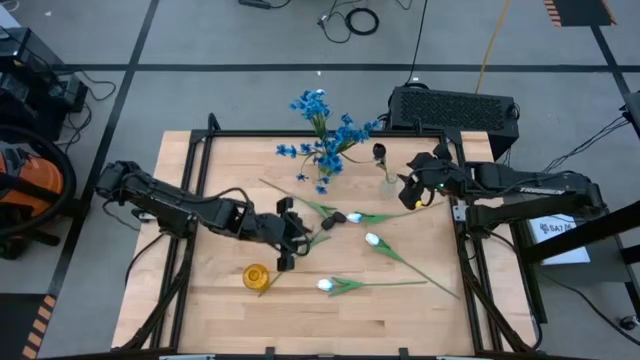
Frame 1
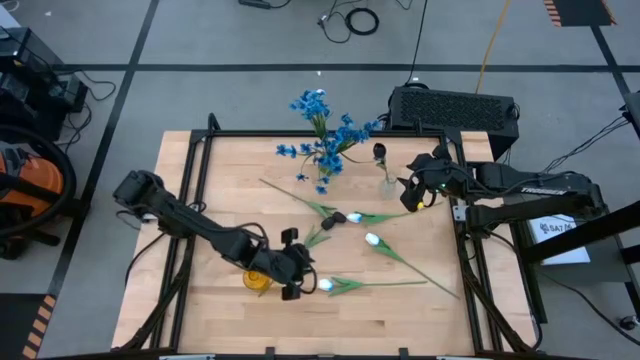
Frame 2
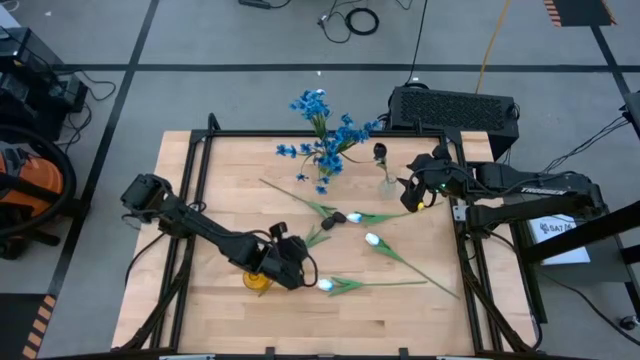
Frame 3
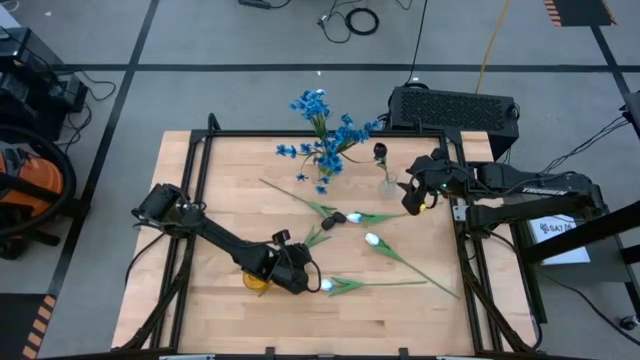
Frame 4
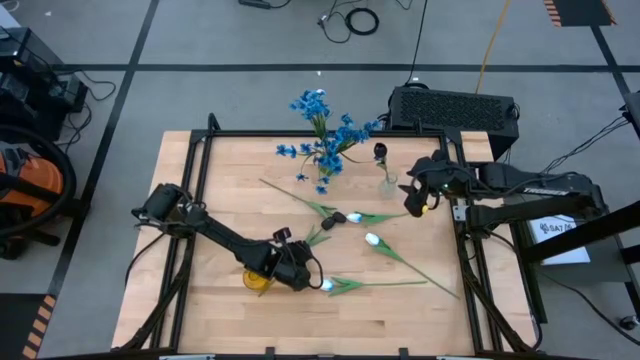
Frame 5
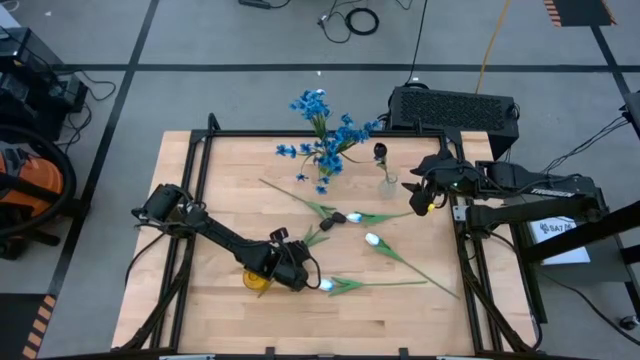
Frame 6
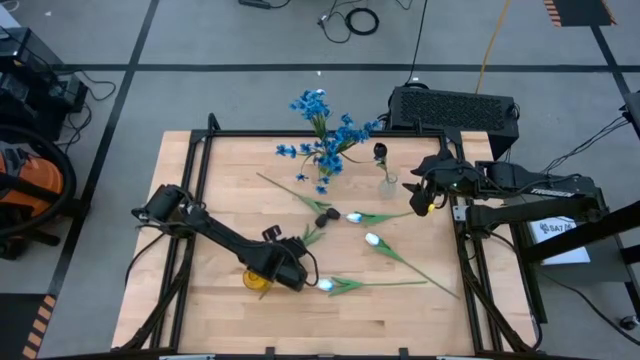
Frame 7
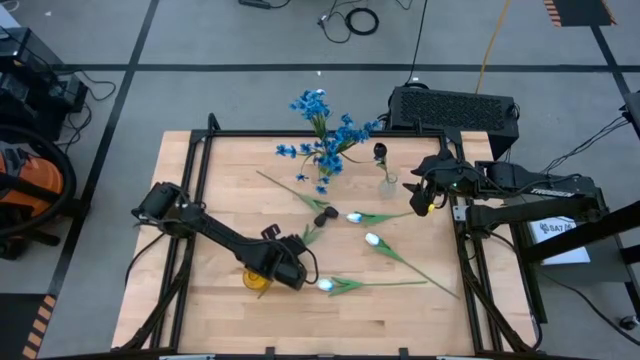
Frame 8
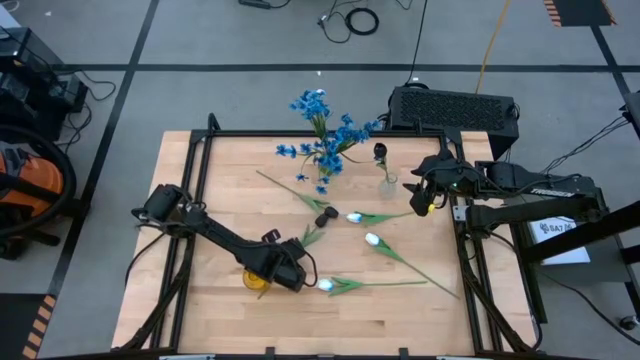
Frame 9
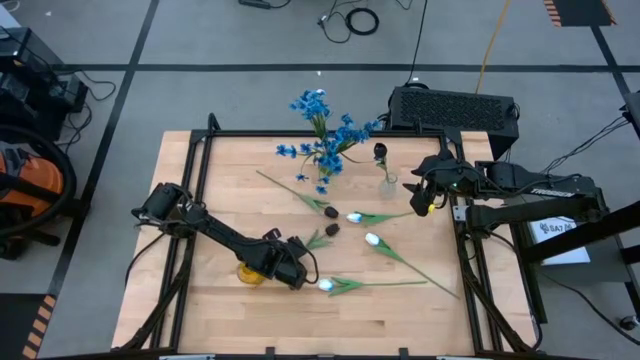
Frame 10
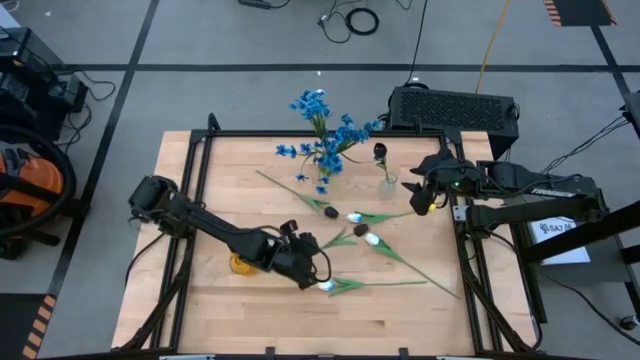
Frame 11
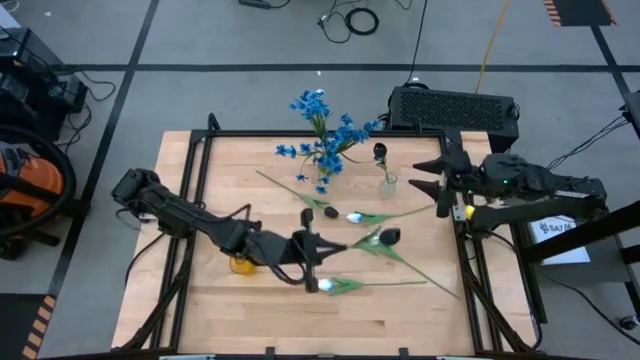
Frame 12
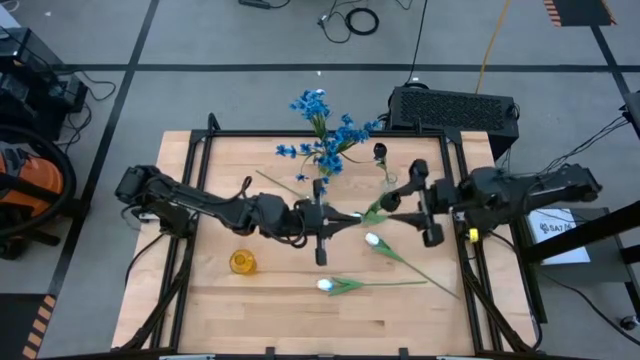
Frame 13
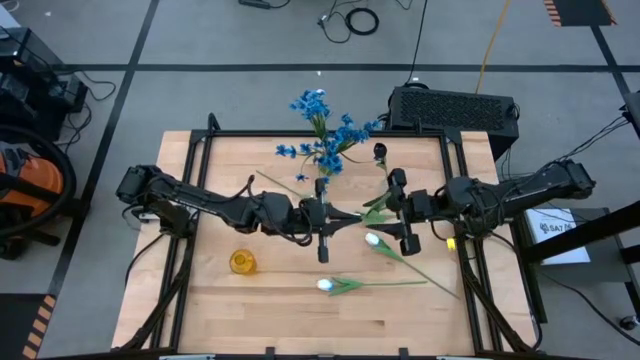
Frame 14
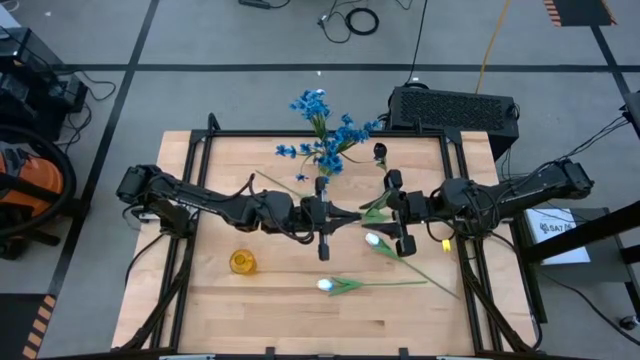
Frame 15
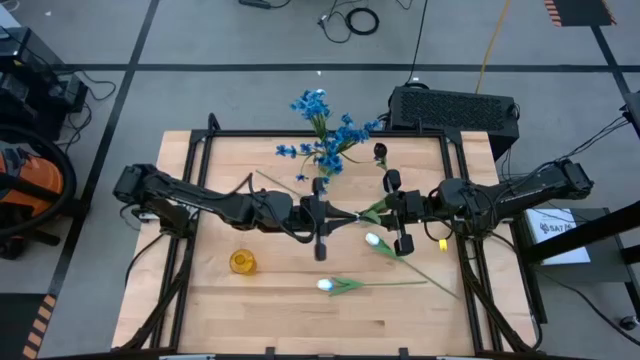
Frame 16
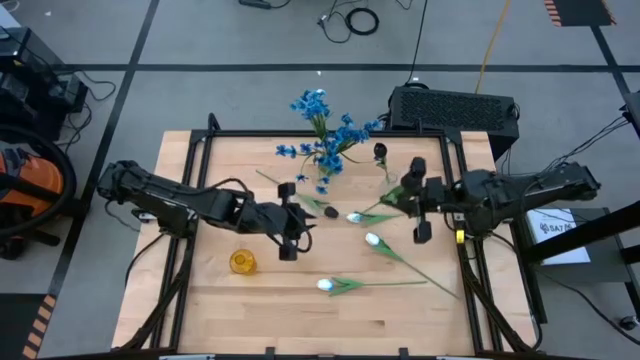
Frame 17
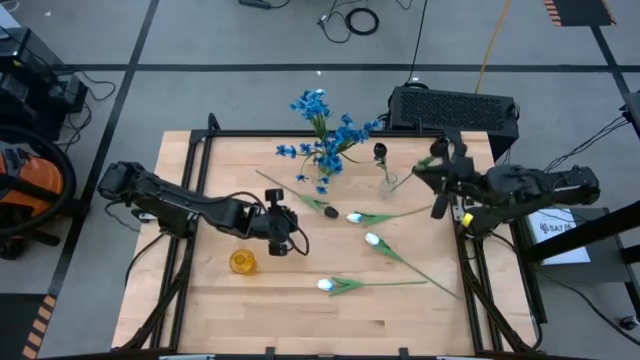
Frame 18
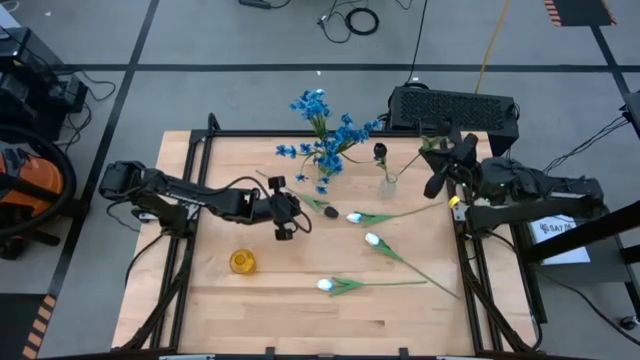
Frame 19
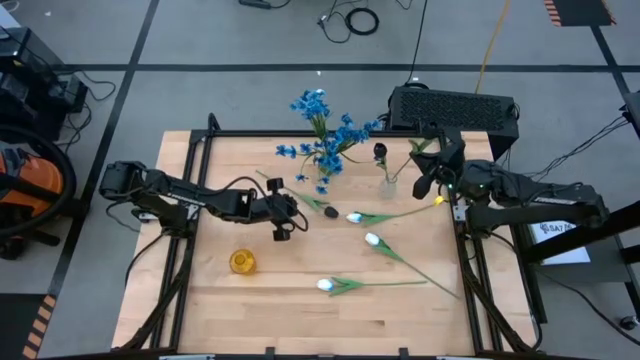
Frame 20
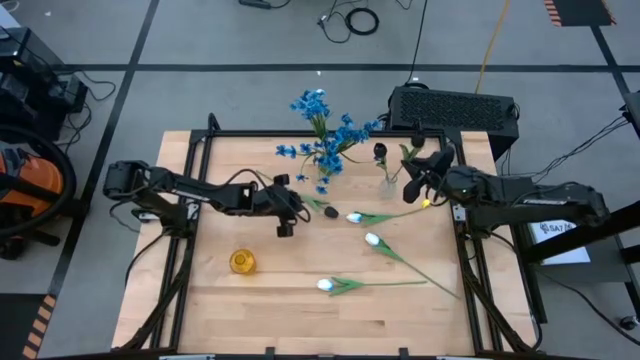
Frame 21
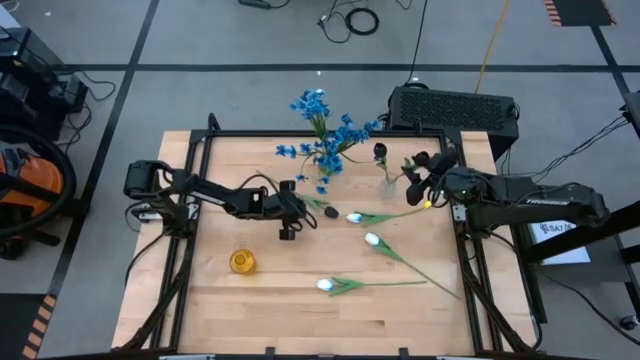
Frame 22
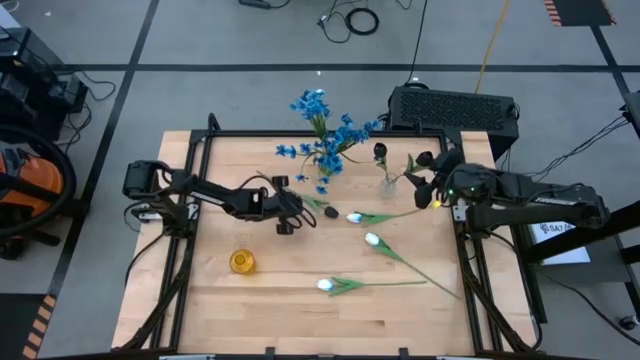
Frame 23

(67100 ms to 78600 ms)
Task: Sort flowers into vase by color
Put the bottom black tulip into the transparent vase

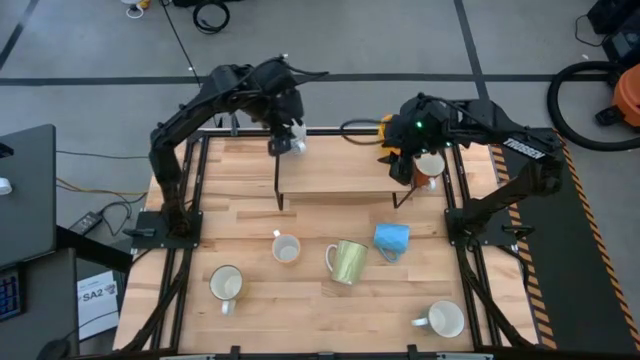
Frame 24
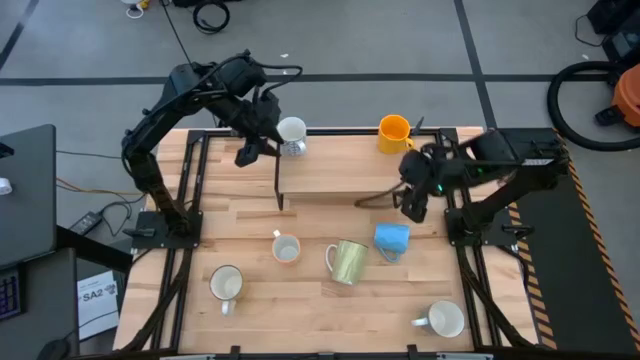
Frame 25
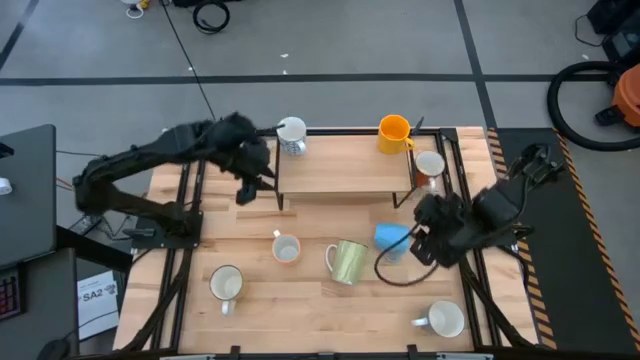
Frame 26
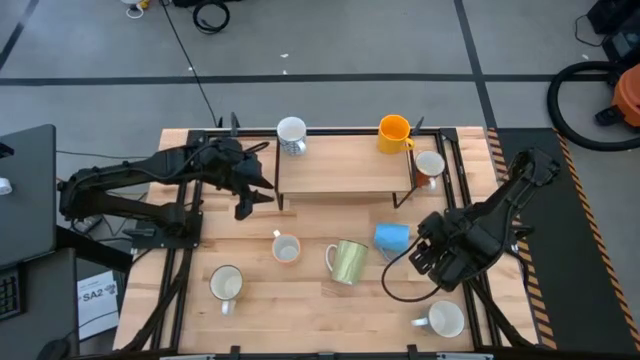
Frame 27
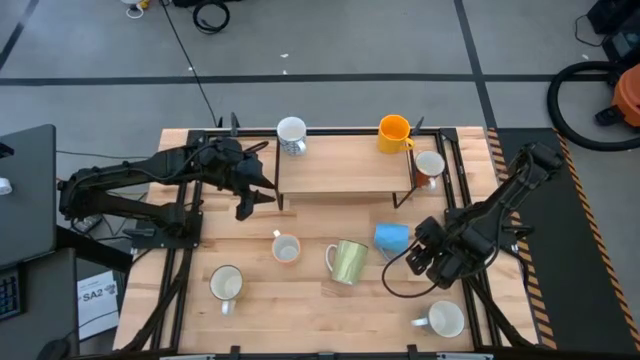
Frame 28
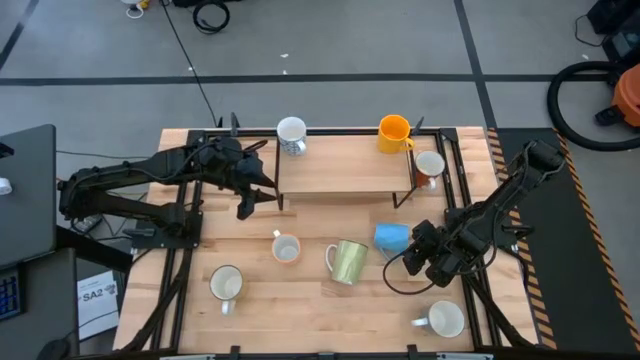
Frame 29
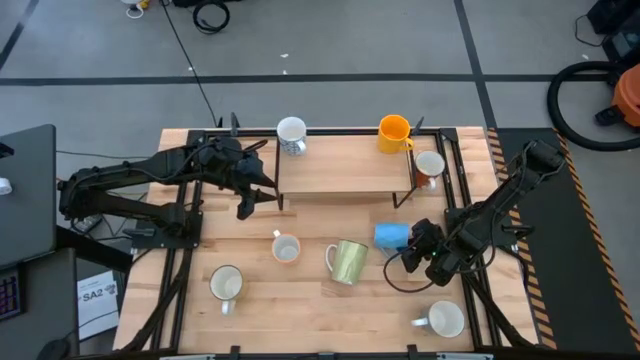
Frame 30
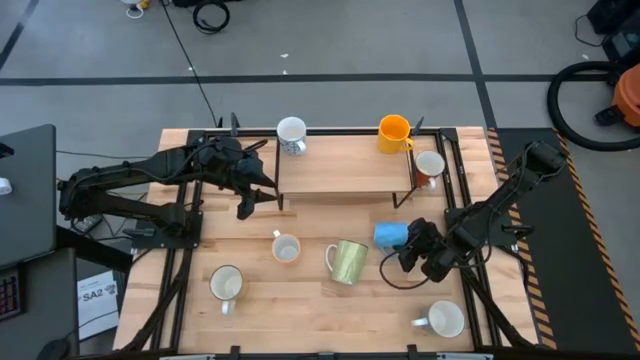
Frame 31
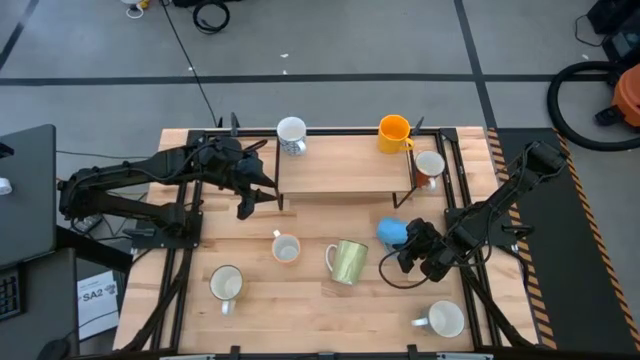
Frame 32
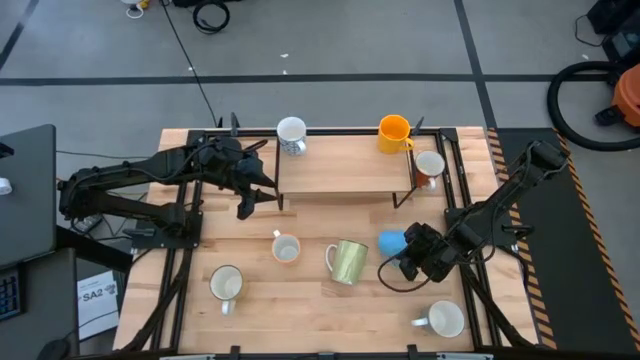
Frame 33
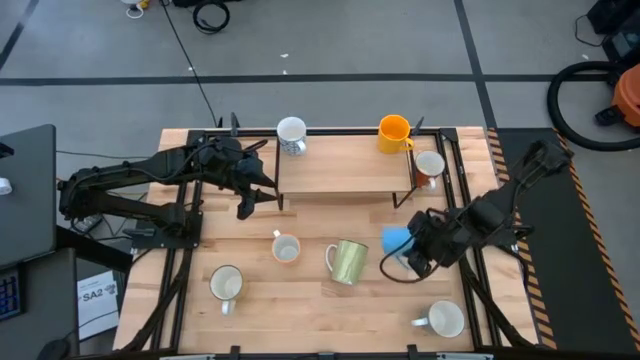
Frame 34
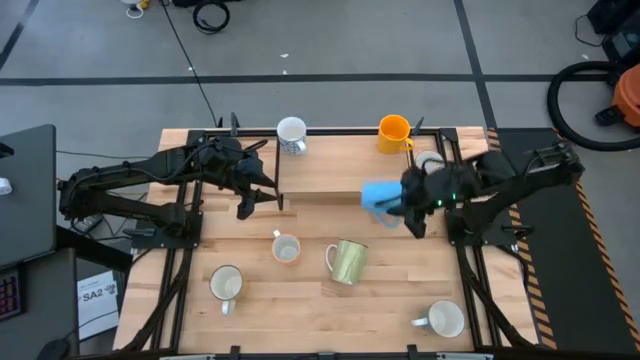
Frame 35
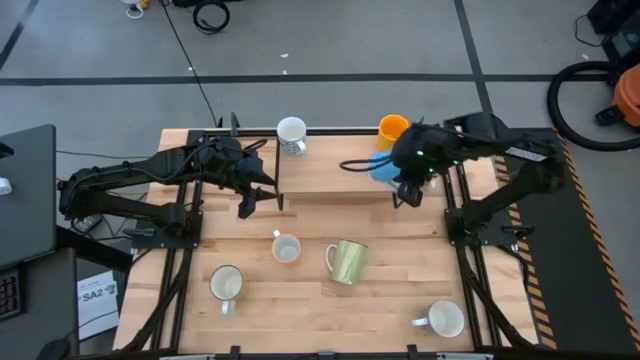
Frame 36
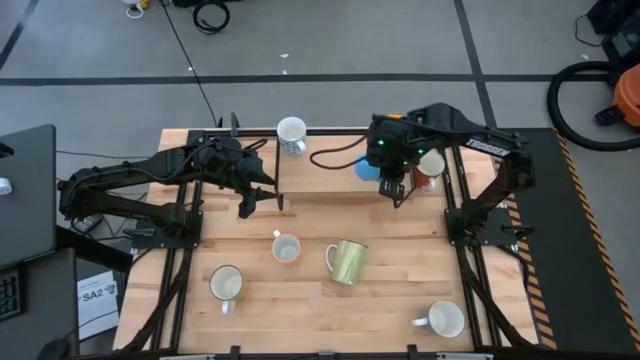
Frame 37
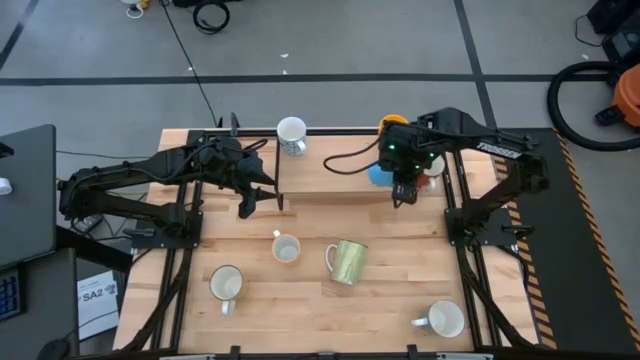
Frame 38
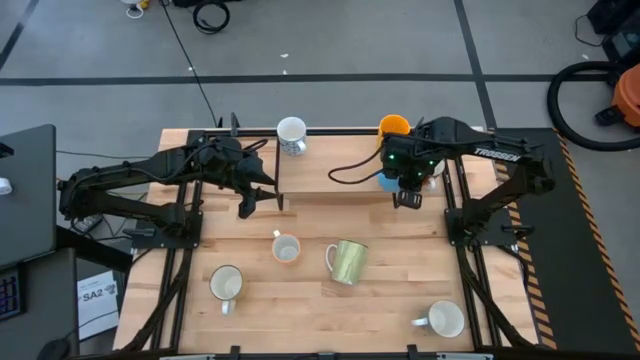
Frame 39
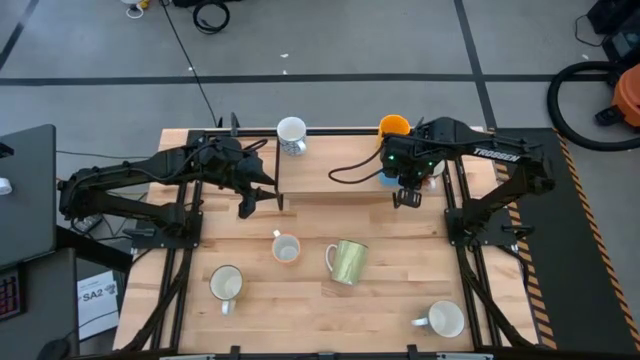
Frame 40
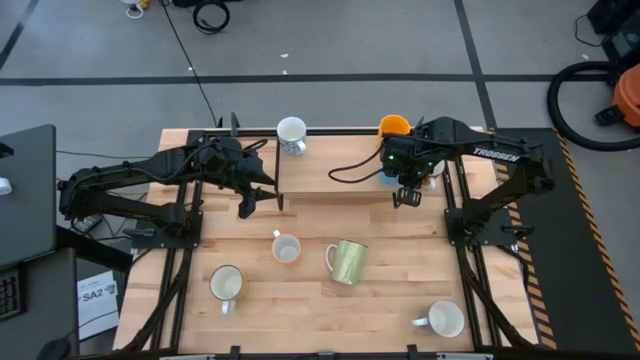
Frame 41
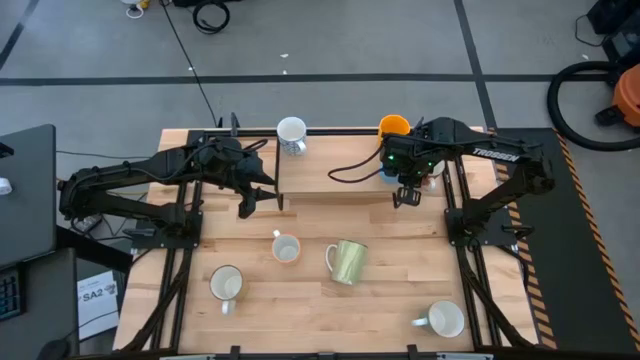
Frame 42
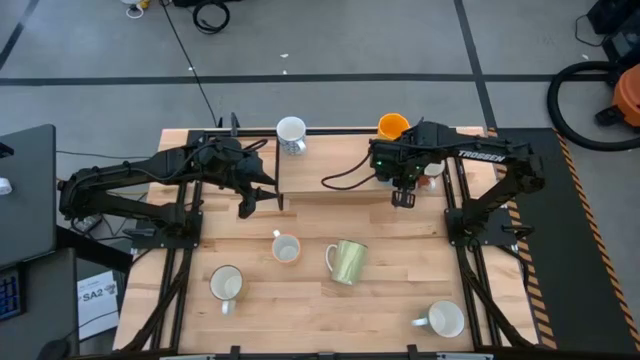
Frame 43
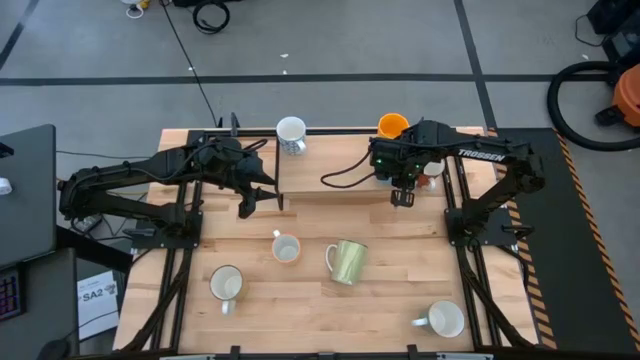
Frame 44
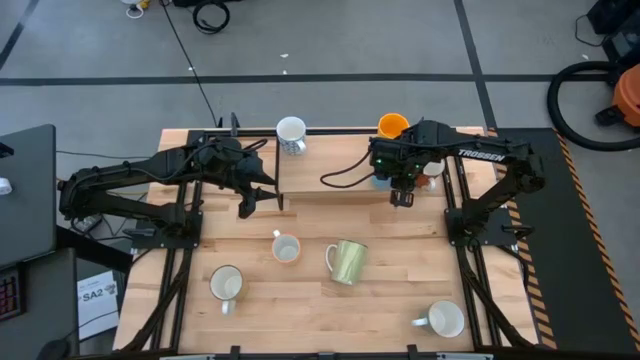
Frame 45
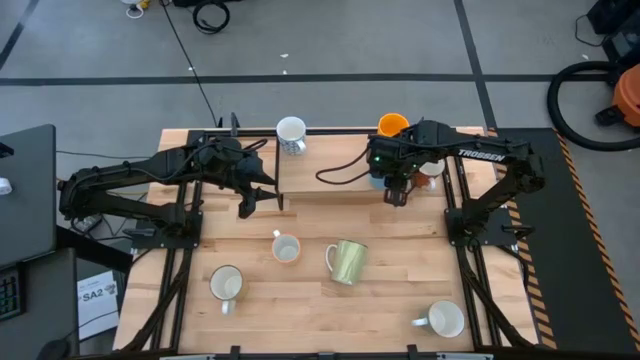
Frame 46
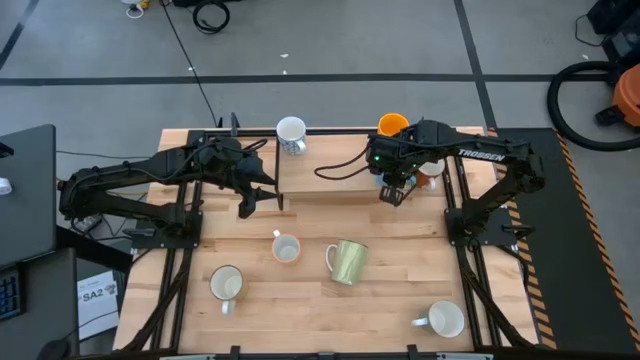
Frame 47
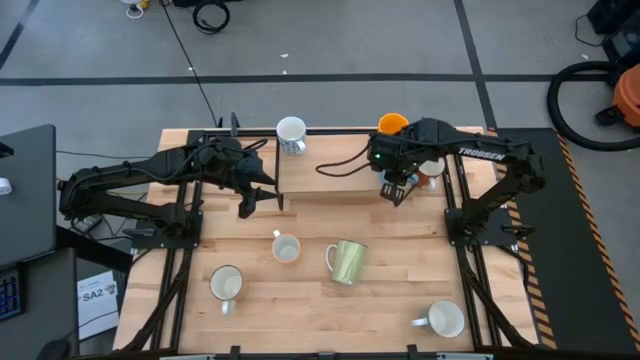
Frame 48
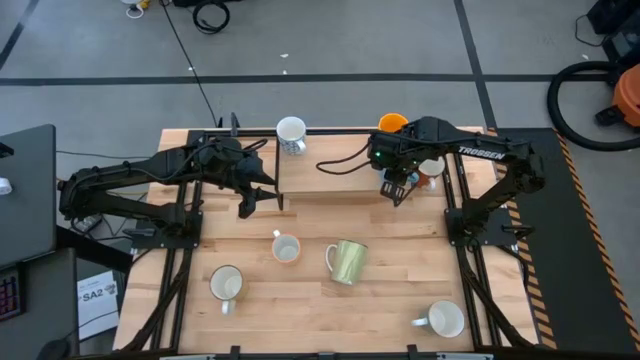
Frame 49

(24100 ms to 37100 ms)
Task: Place coffee mugs
Put the light blue mug on the shelf
